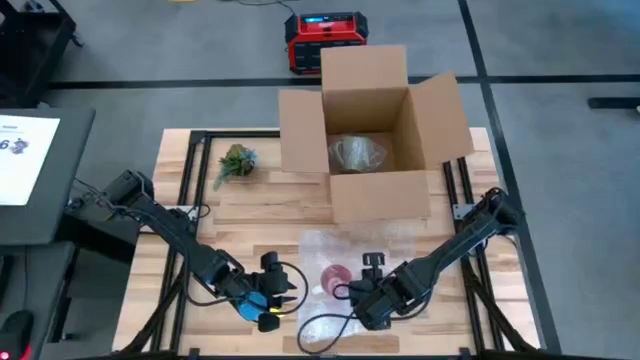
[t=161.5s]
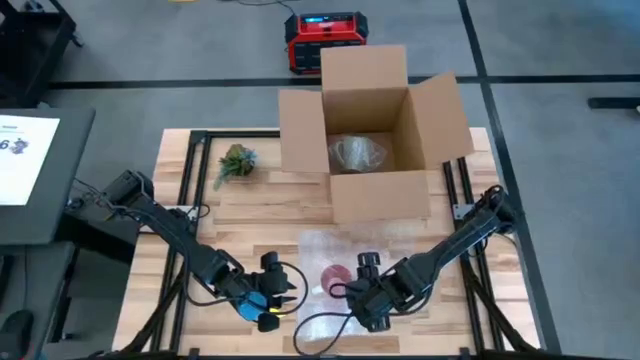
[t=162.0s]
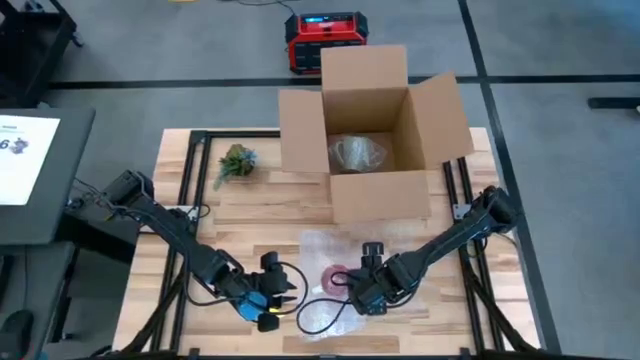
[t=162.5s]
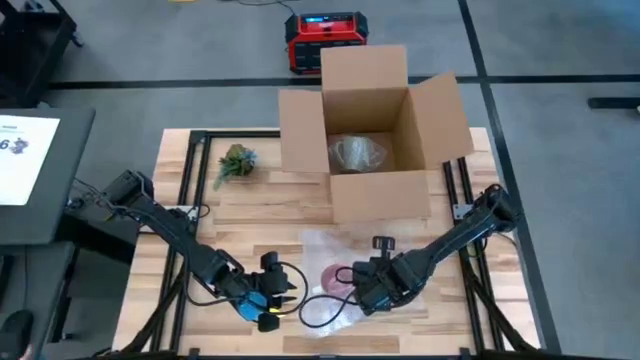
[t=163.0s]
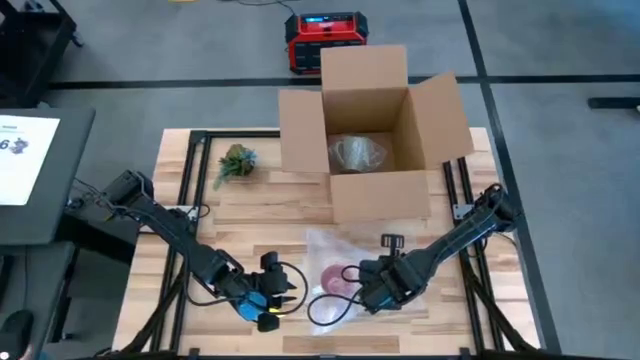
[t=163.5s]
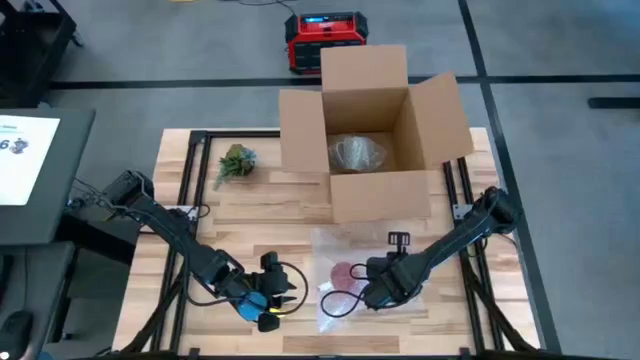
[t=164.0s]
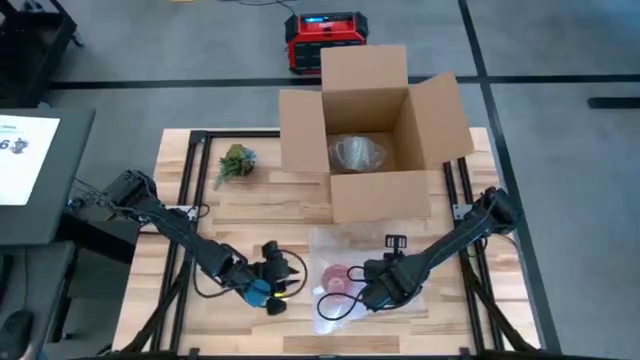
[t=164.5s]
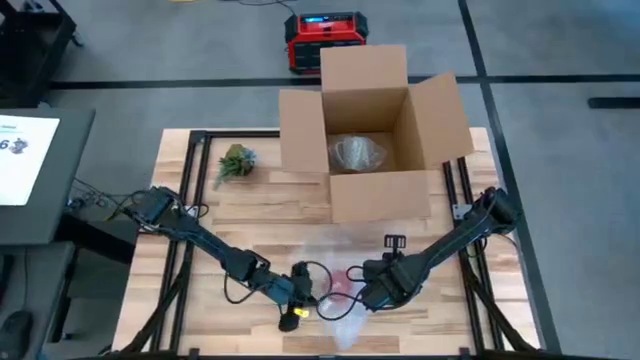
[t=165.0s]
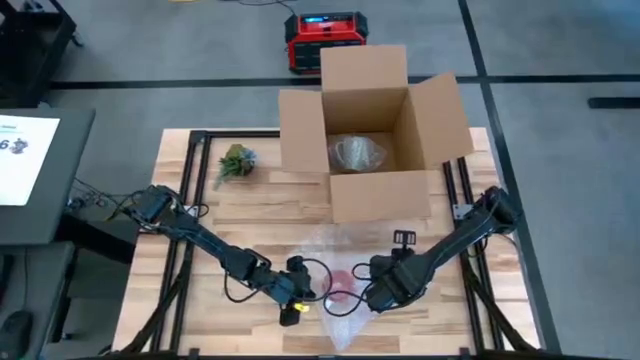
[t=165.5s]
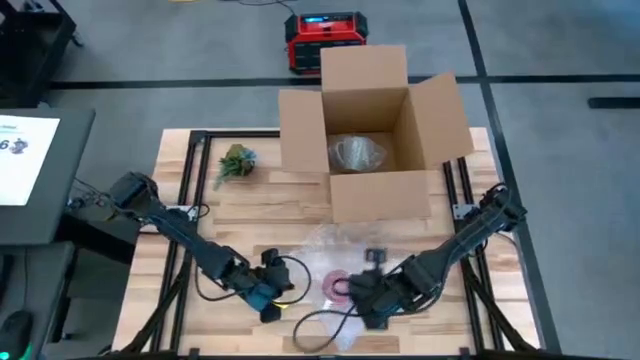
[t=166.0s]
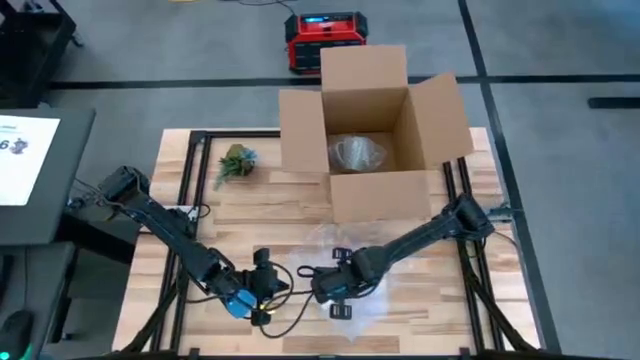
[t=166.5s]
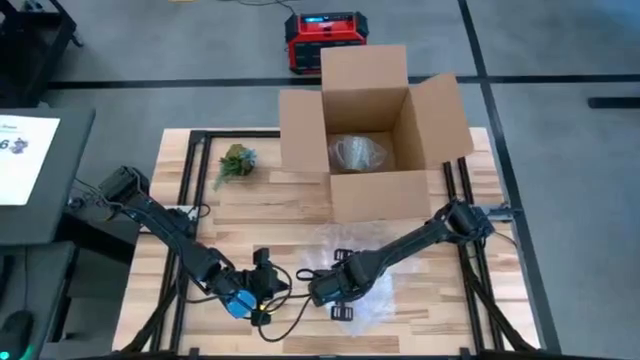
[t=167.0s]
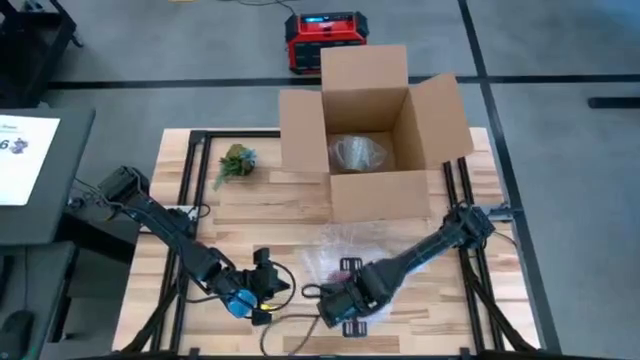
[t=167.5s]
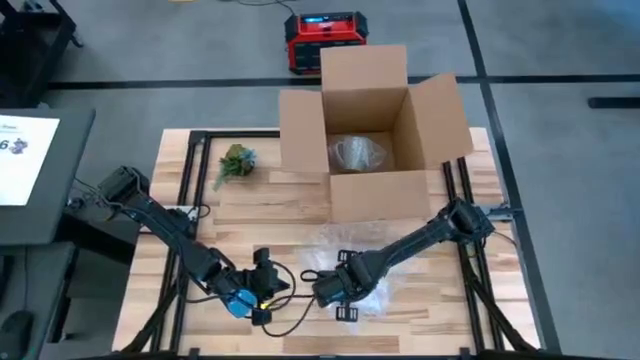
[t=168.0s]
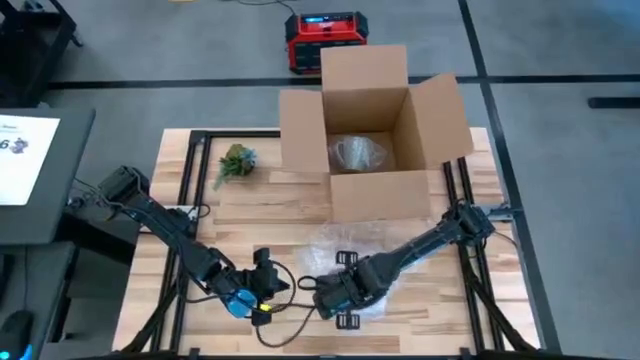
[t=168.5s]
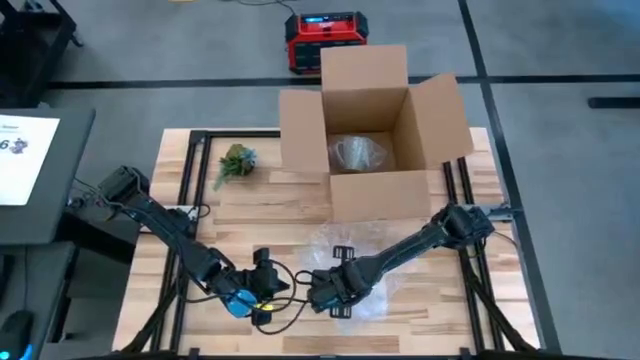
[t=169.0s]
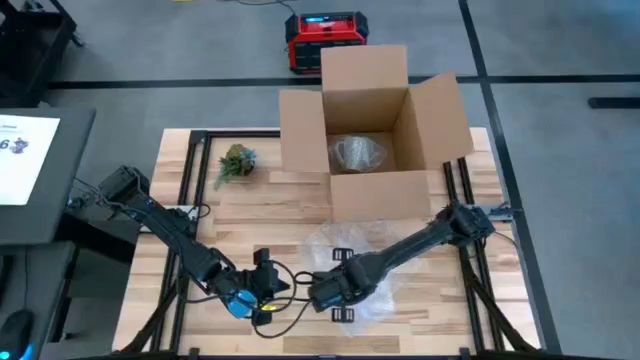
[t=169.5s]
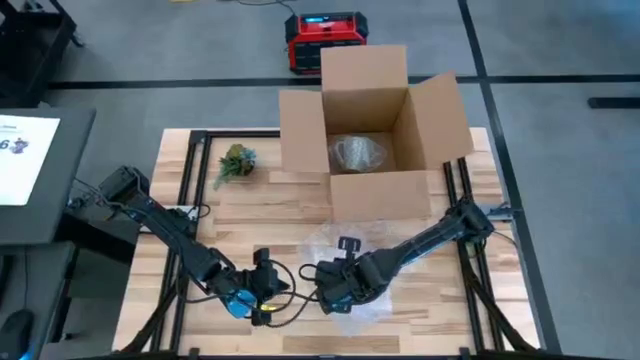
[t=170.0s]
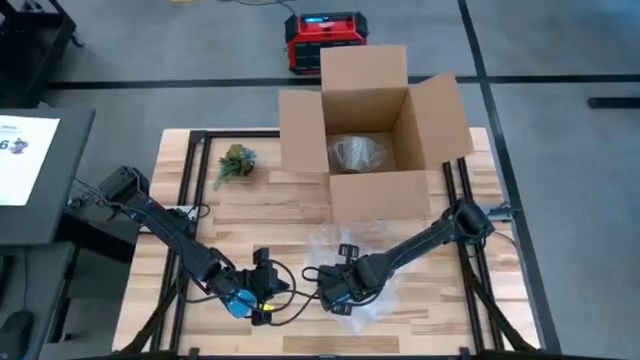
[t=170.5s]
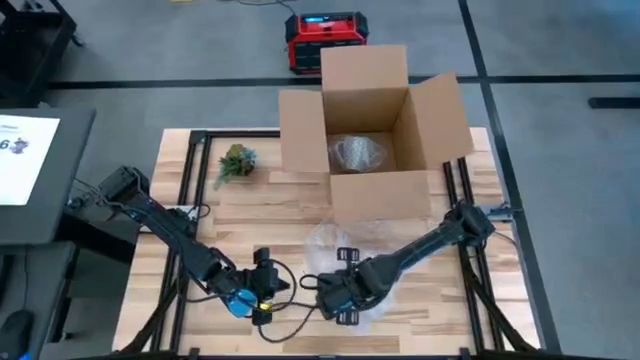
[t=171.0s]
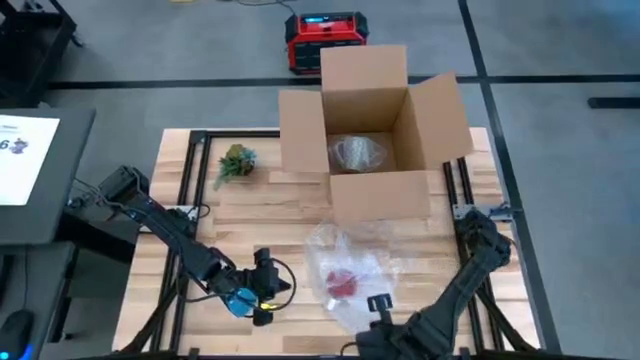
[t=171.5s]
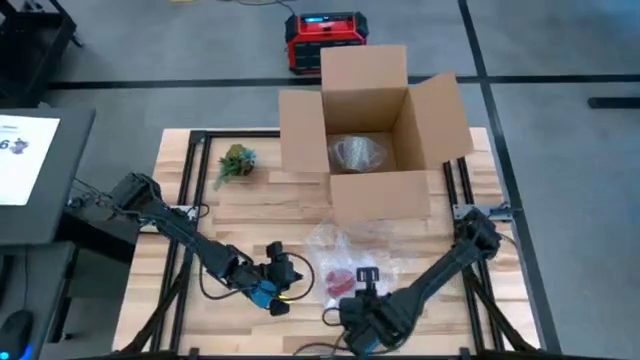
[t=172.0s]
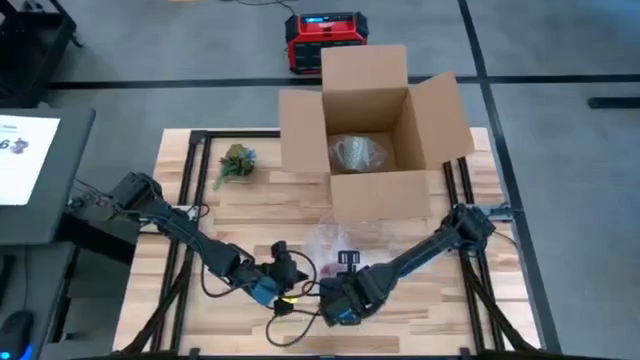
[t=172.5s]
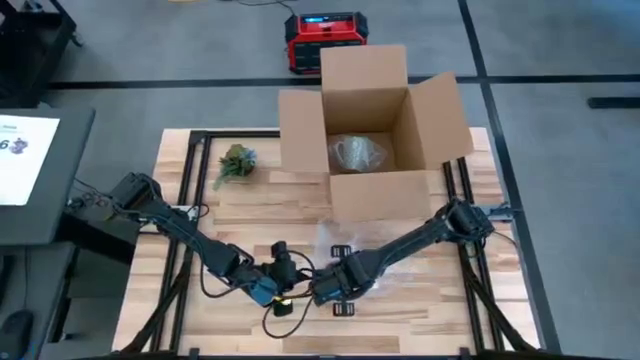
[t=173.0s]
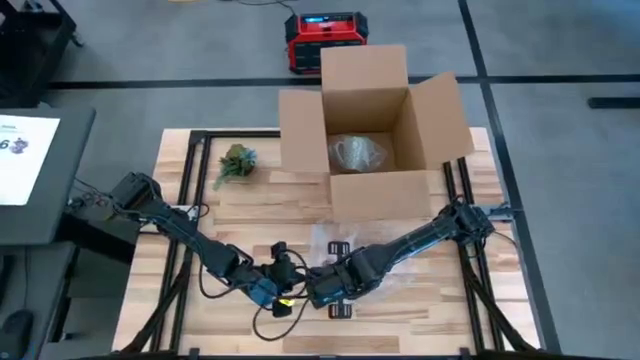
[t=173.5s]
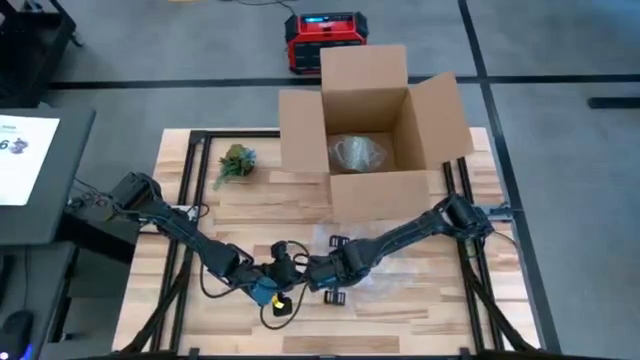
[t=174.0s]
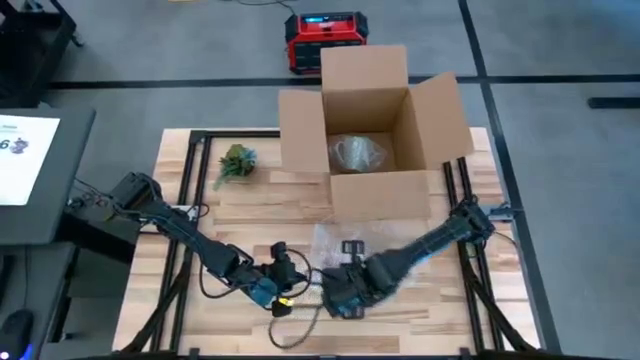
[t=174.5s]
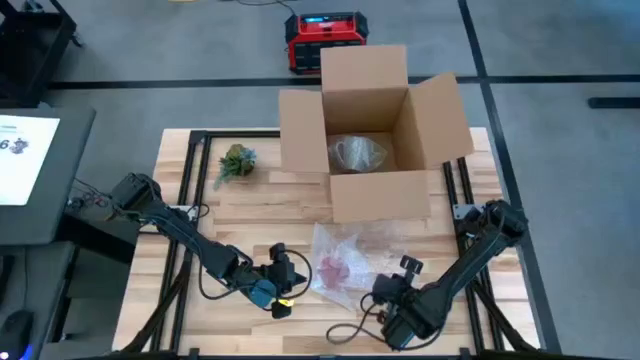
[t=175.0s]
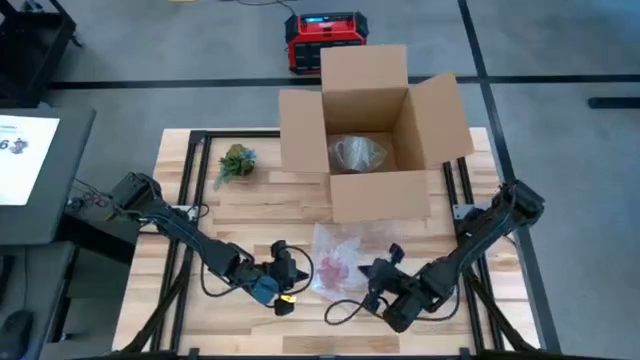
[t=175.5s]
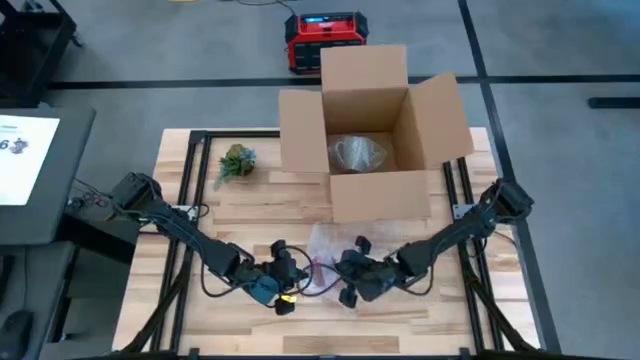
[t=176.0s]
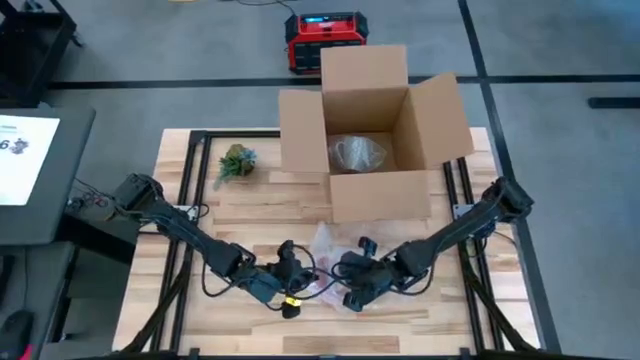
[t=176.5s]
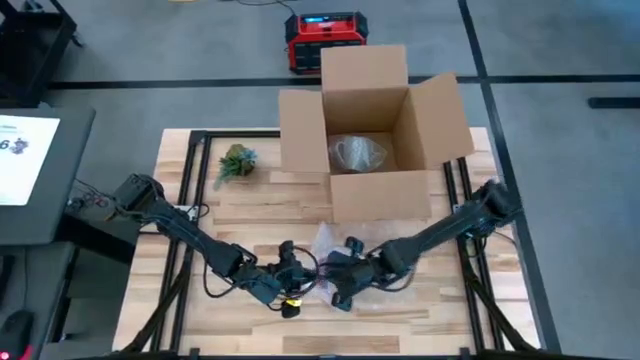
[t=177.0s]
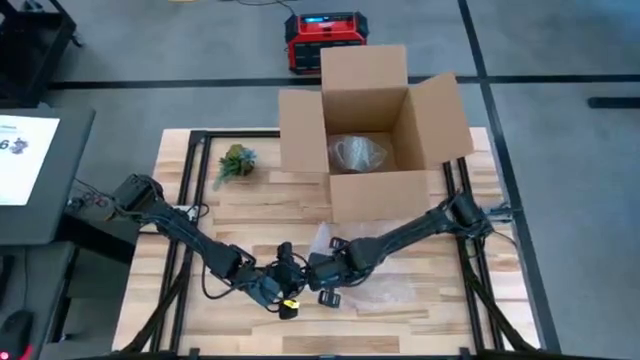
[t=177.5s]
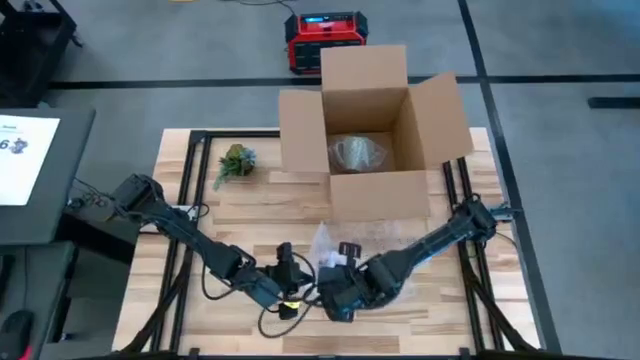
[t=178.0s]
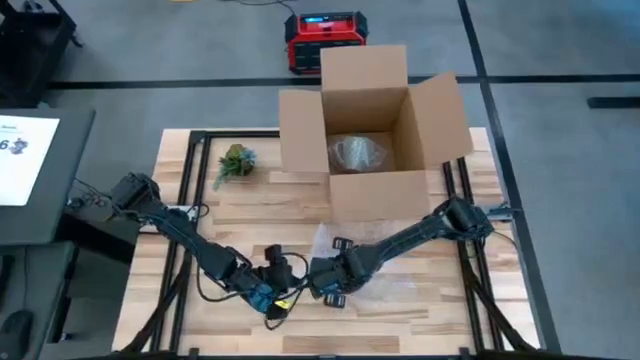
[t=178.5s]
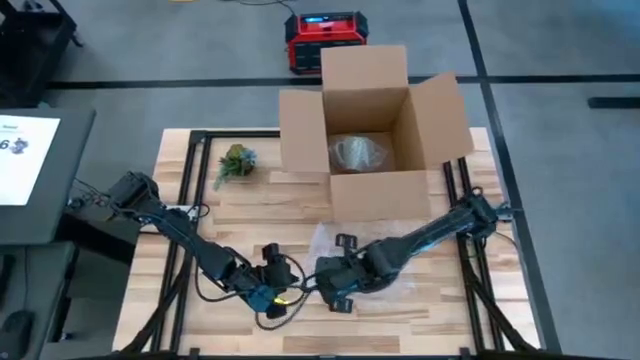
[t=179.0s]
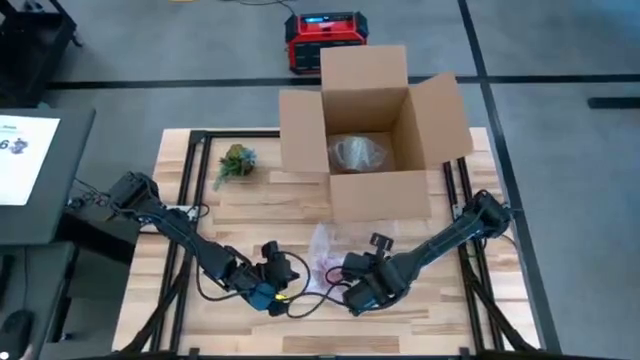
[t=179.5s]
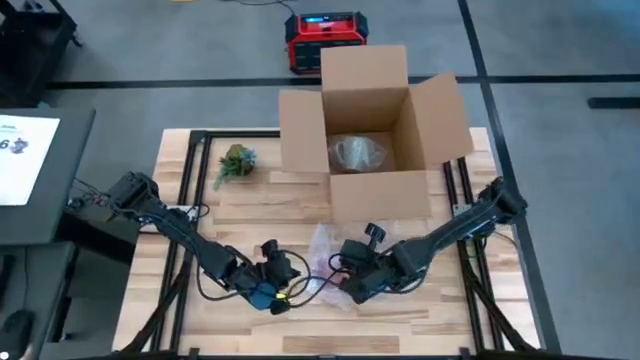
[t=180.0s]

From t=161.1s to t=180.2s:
Task: wrap mug
Wrap the red mug with the transparent bubble wrap

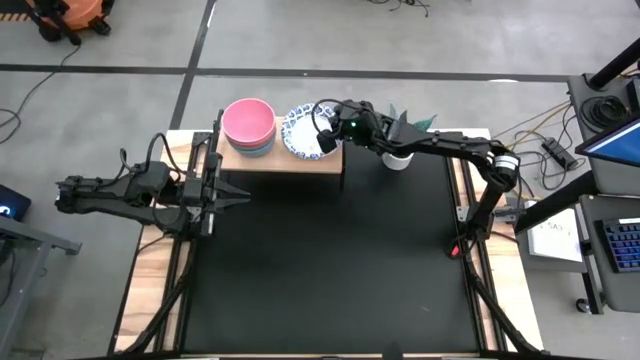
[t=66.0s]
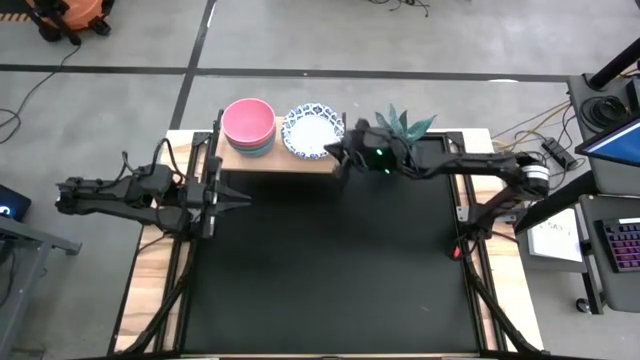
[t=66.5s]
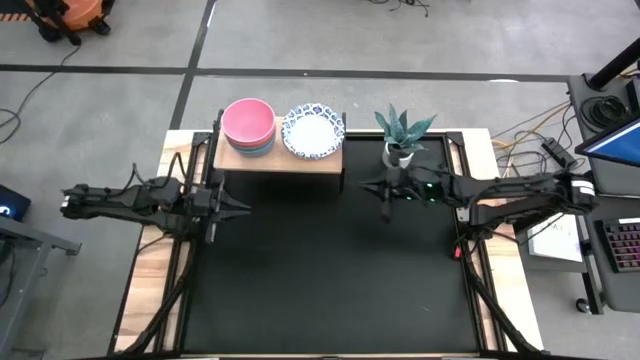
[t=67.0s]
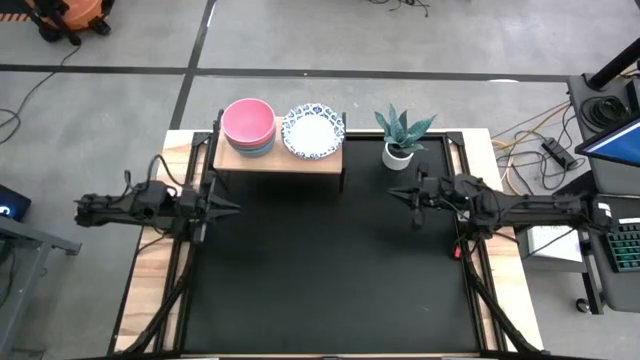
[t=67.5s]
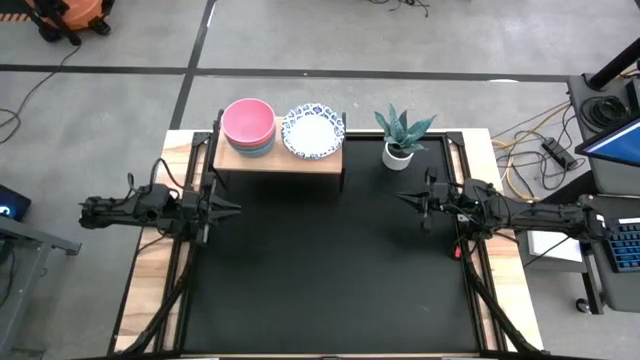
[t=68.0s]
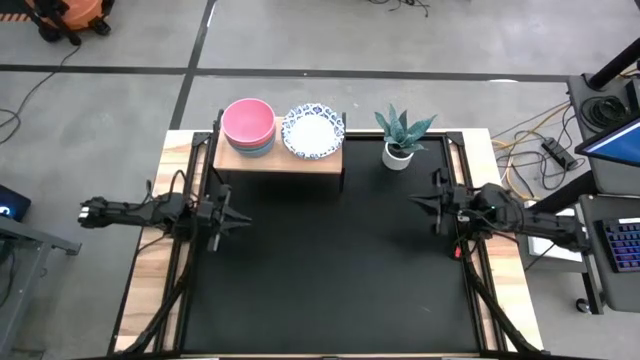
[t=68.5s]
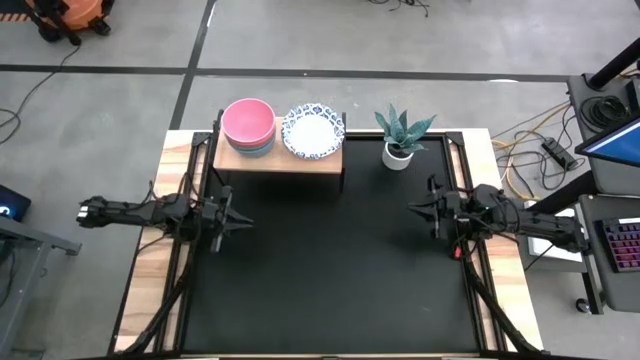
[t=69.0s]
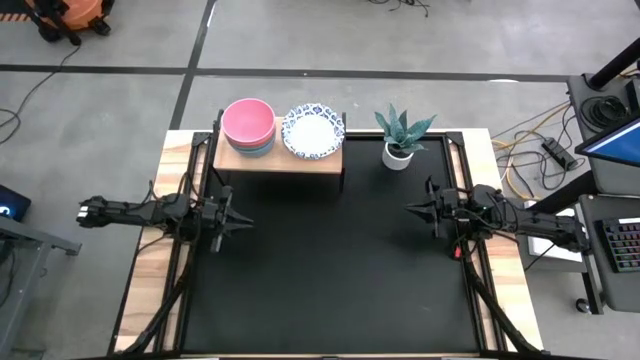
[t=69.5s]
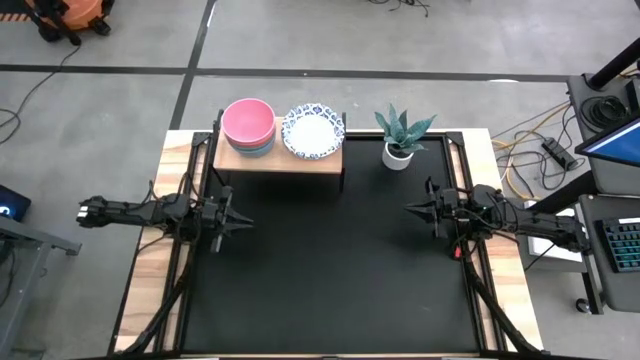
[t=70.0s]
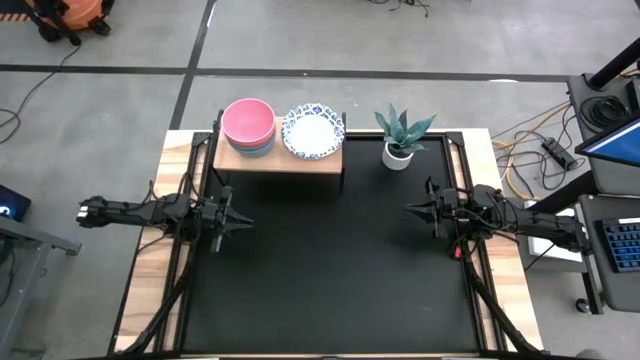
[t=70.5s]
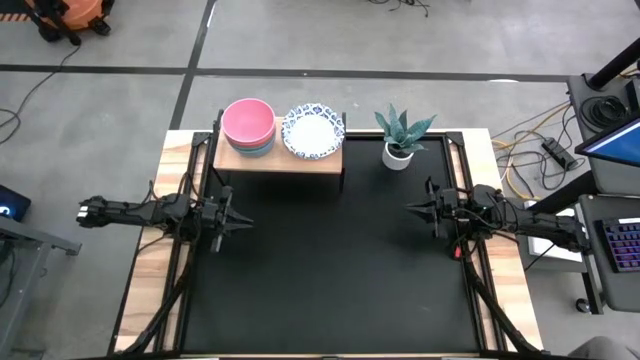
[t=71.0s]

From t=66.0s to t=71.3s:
Task: Place and stack bowls onto a shelf
Return to Home Position
